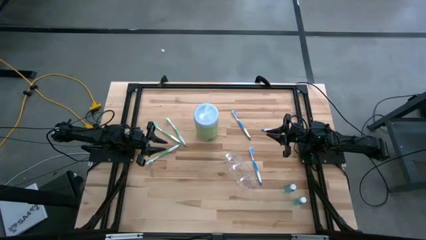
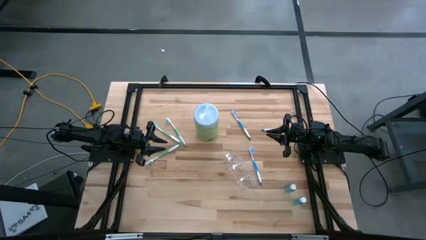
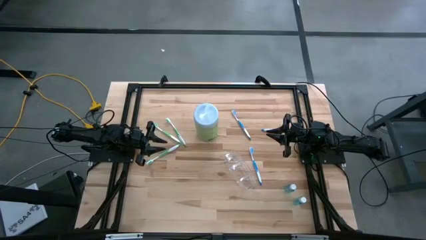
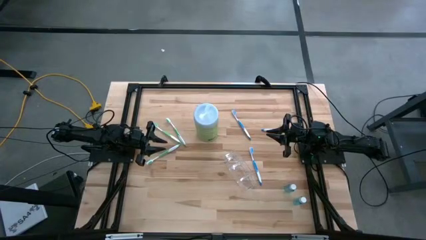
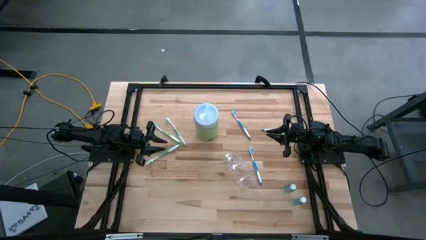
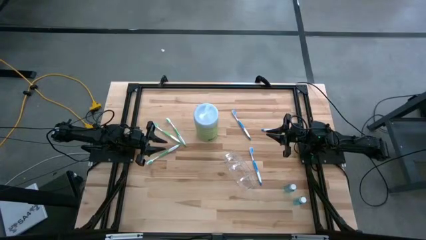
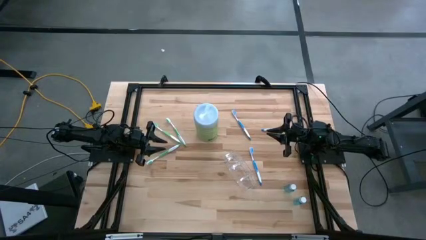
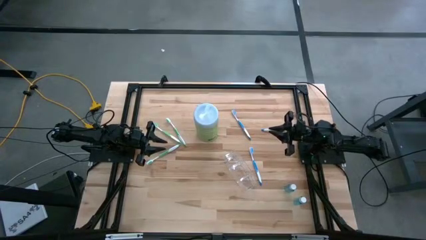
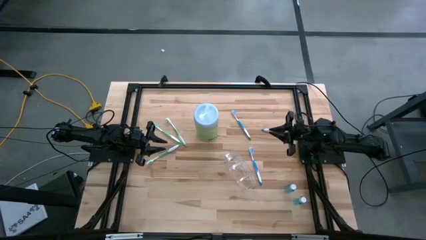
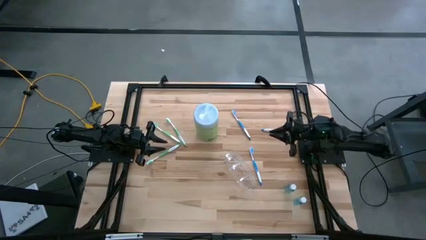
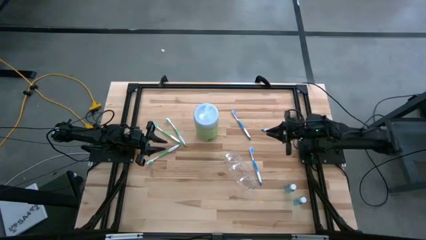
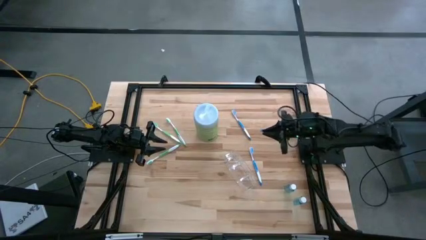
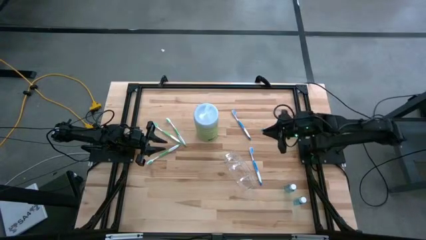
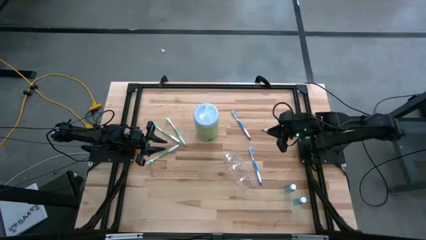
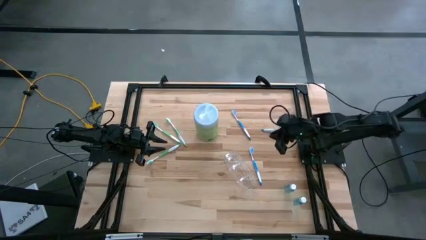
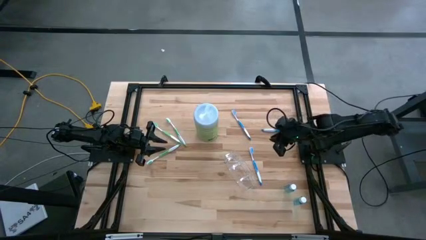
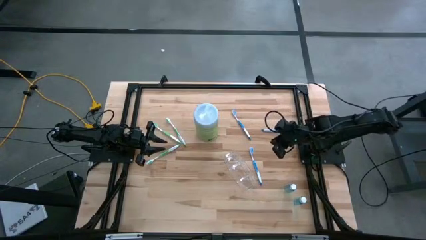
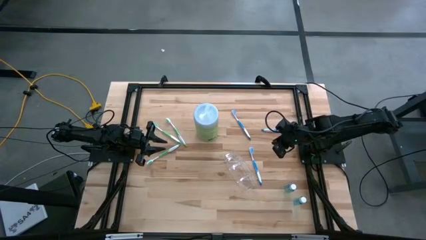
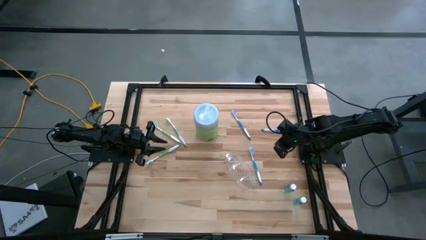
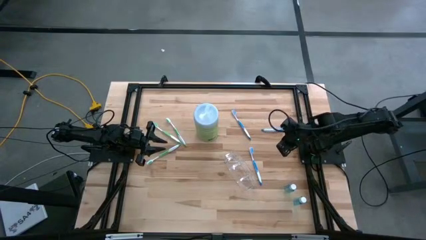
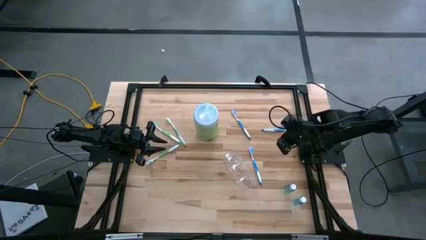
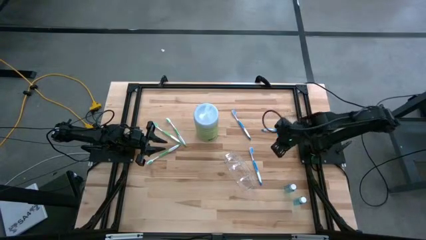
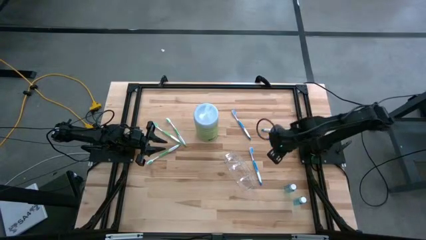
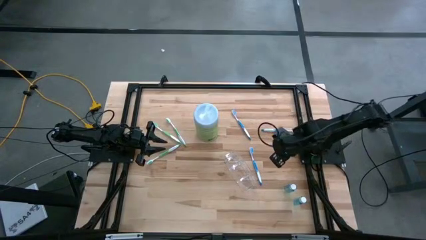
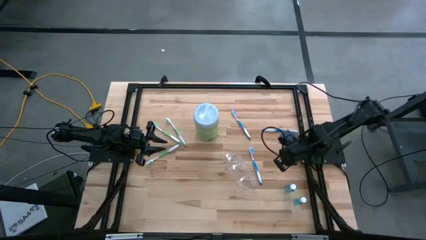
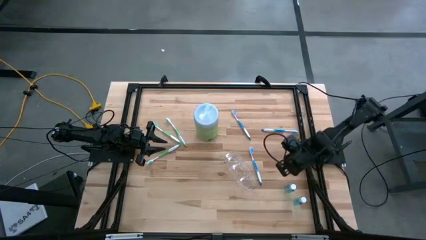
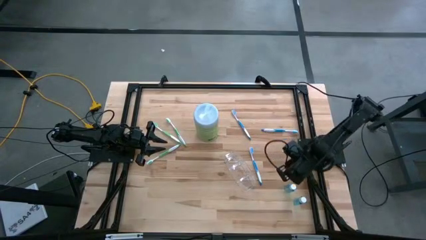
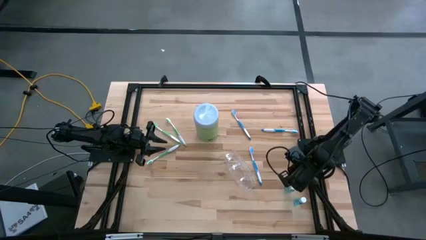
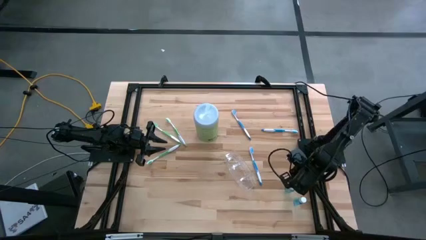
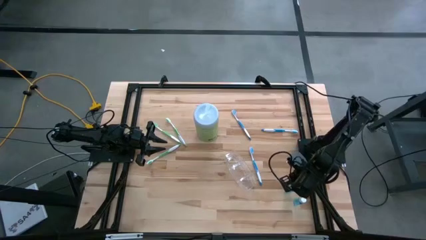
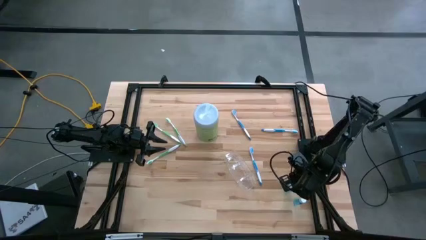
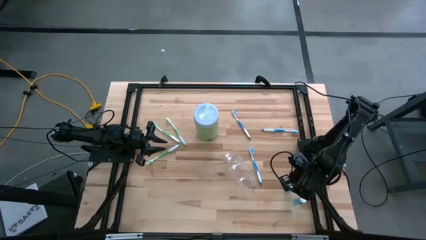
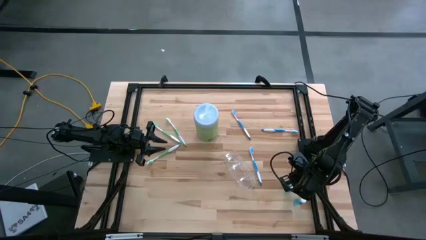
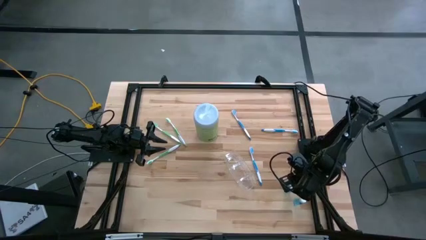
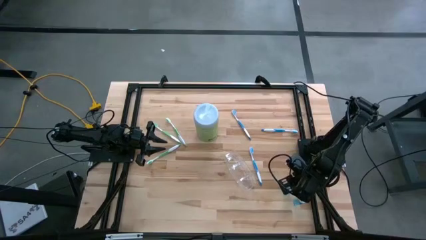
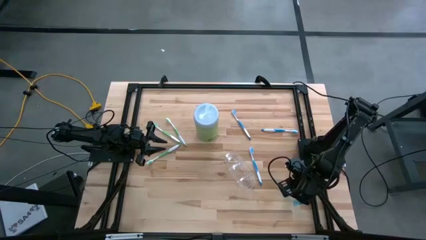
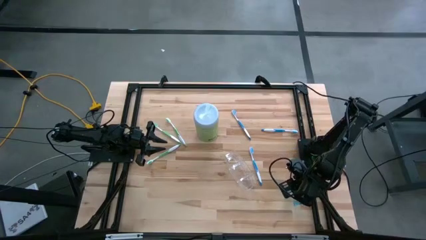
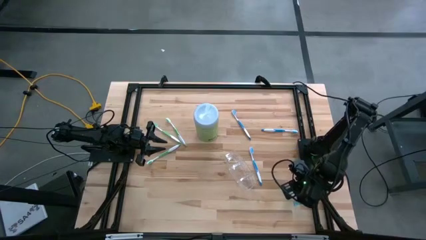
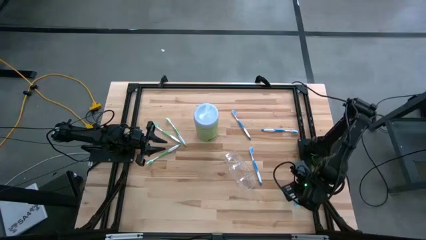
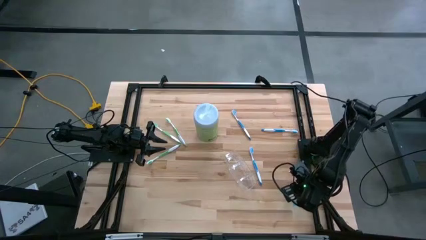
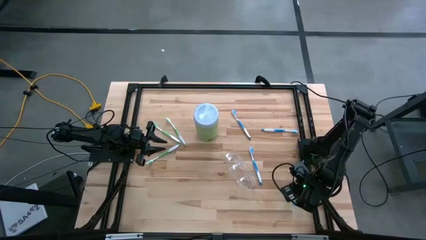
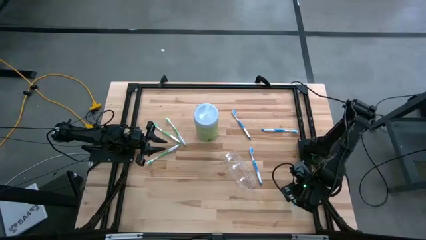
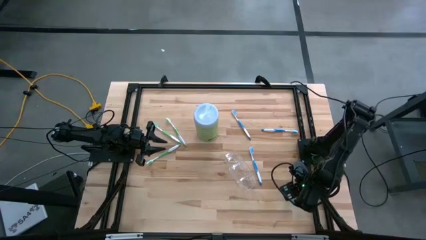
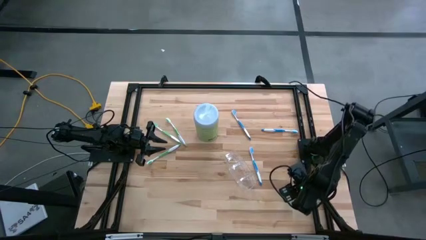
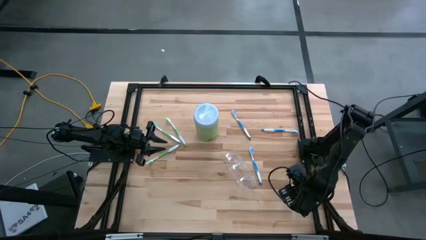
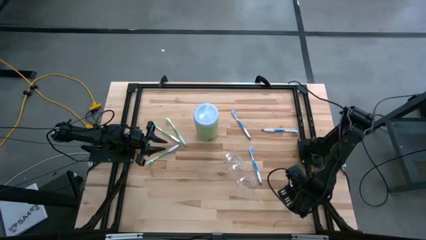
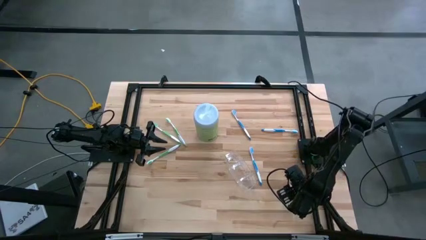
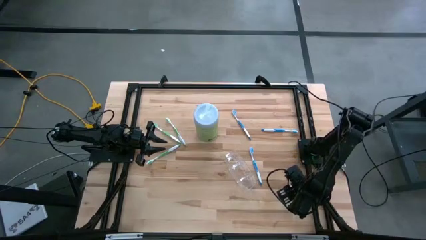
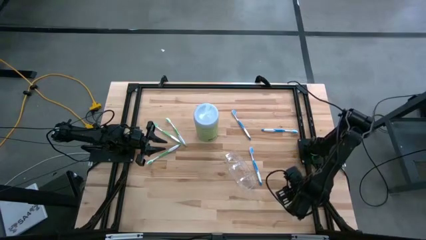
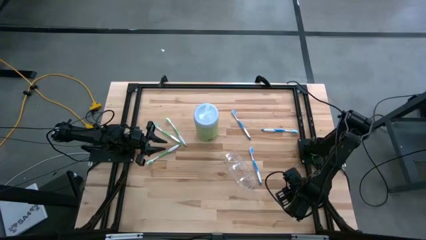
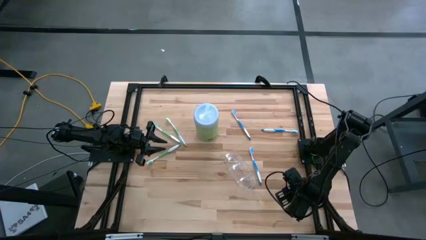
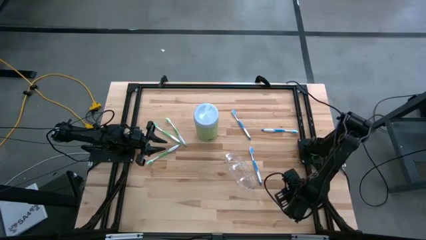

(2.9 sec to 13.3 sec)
Task: Pick & Place toothbrushing station
Put the top mouthwash into the transparent organizer

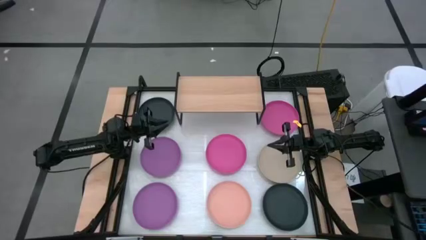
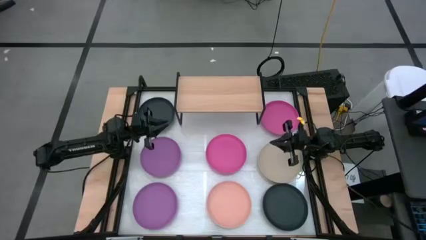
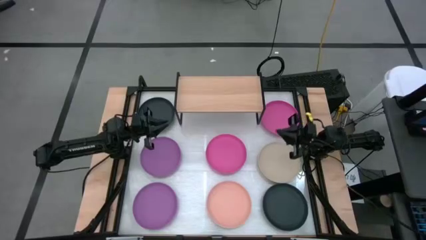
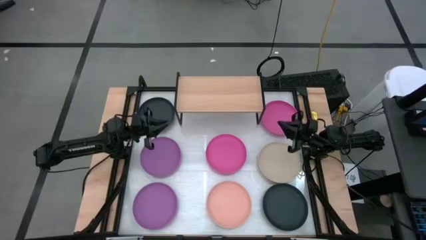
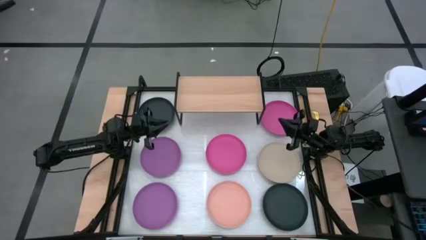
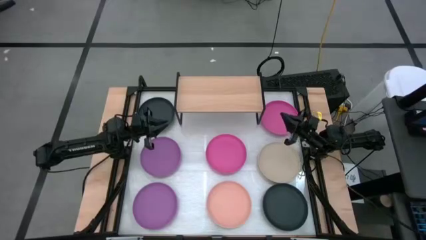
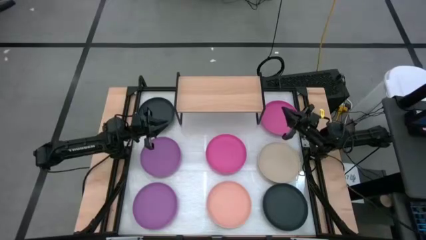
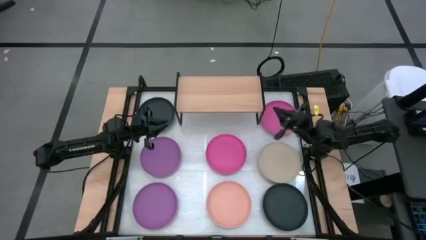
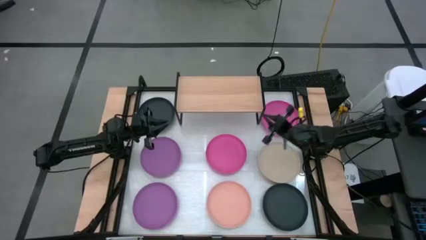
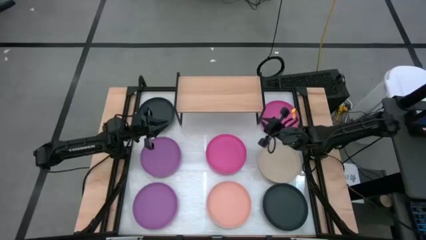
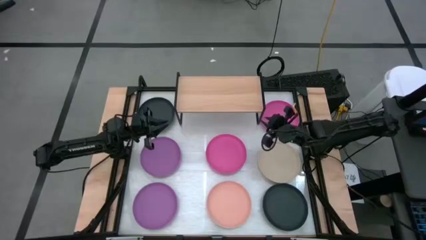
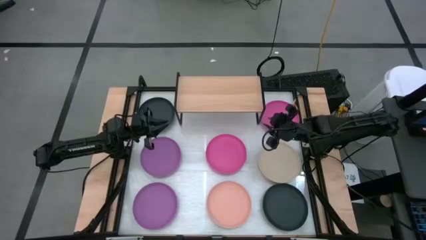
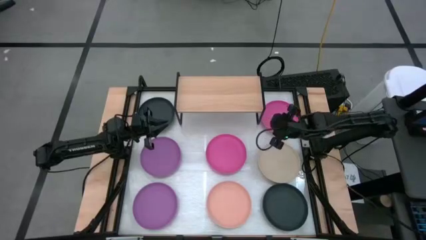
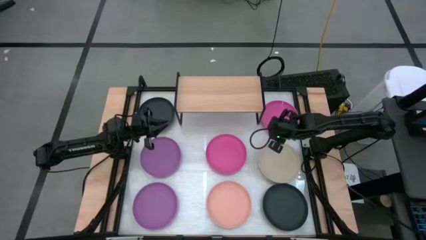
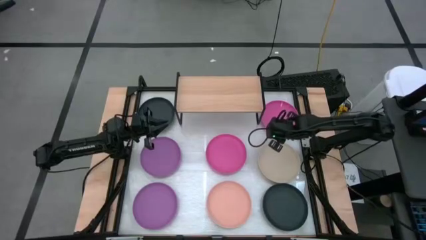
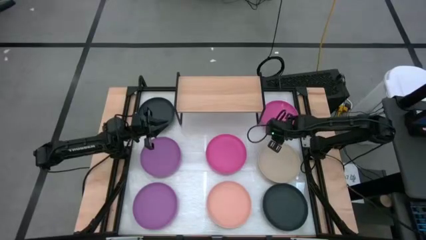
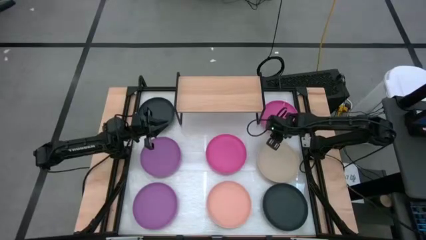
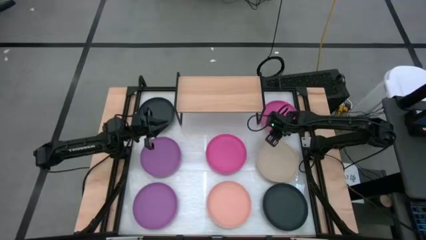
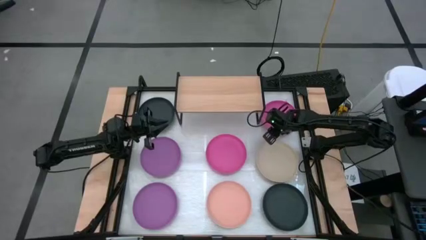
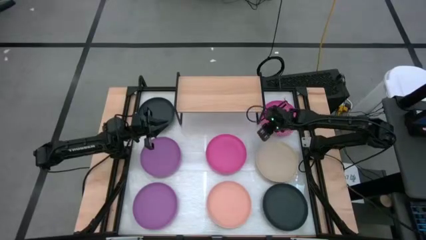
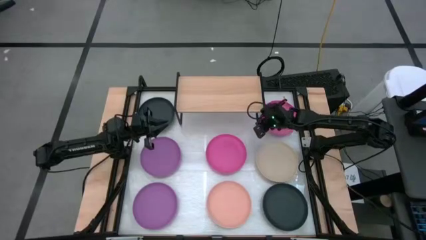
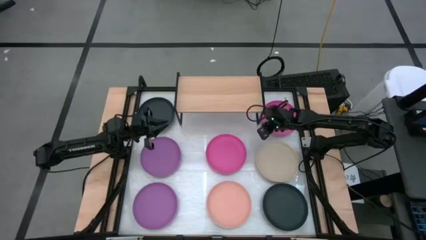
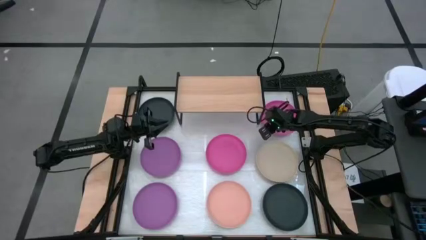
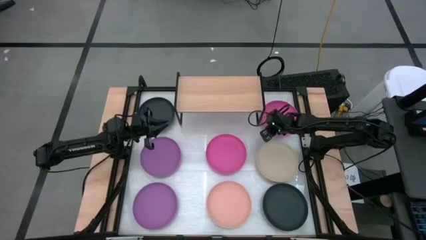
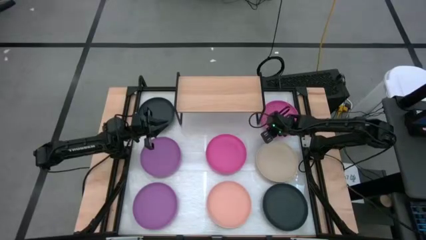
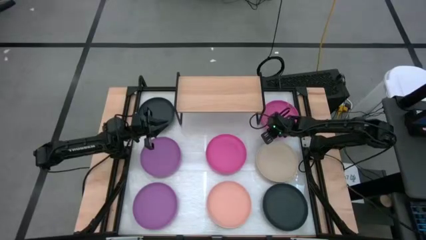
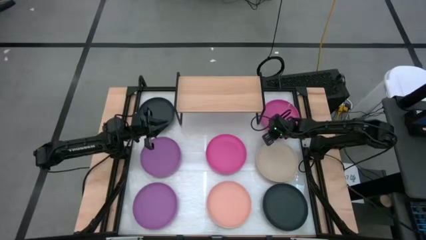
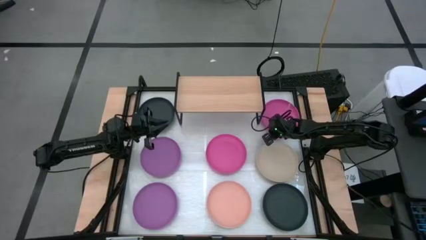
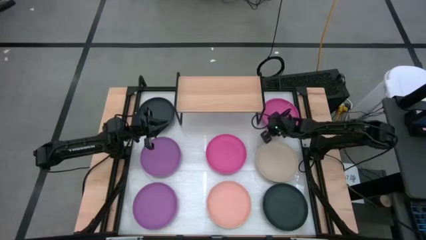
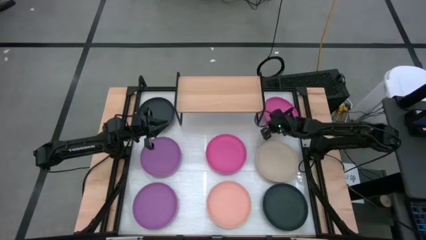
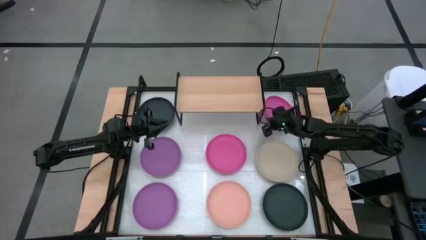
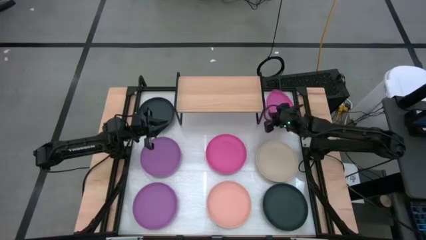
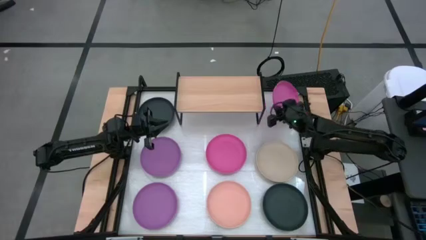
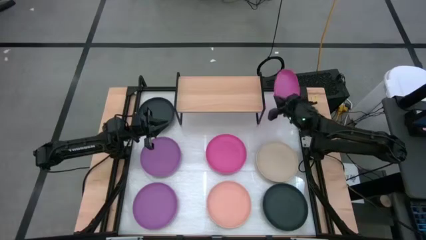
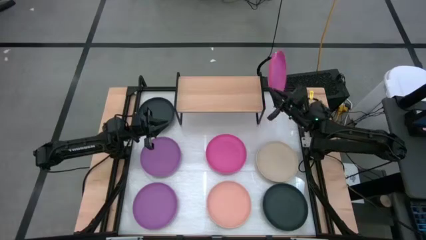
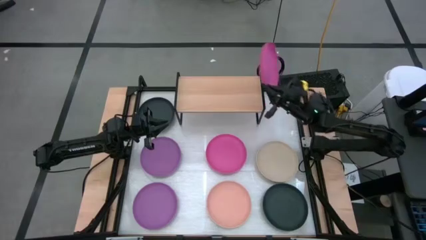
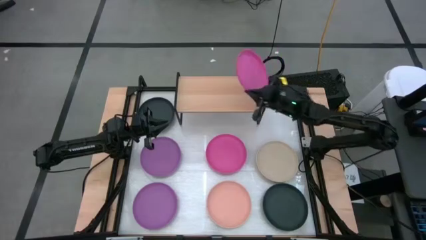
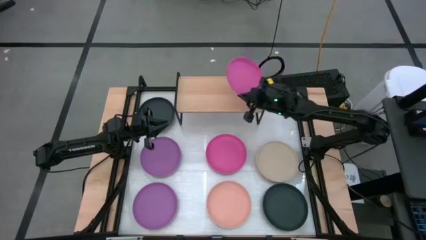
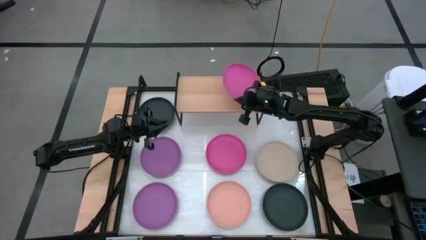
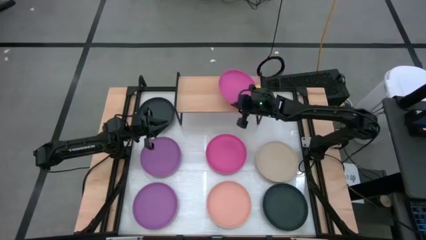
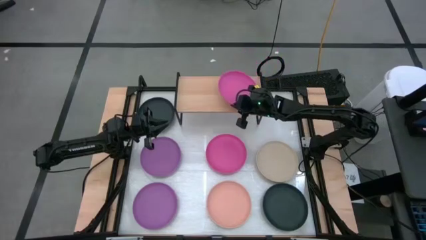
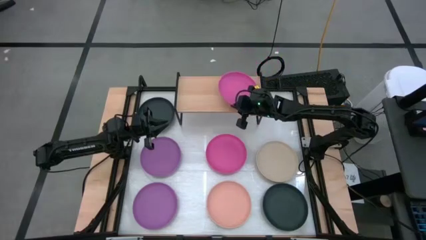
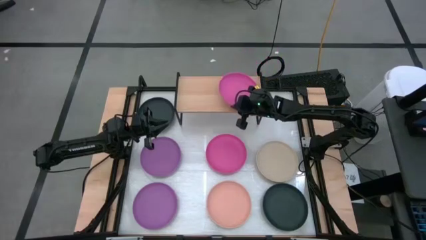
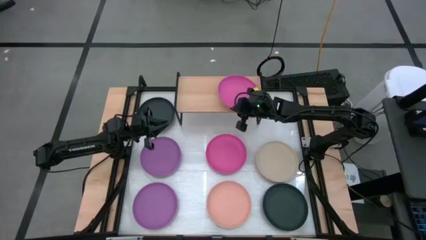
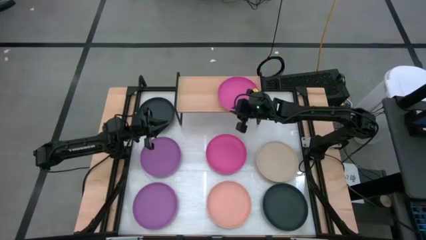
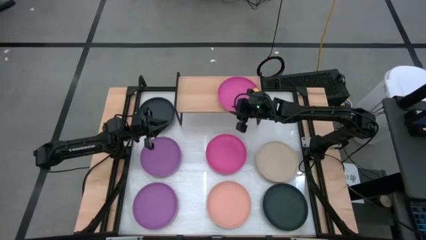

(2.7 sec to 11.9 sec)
Task: Place and stack plates onto a shelf
Put the top pink plate on the shelf
